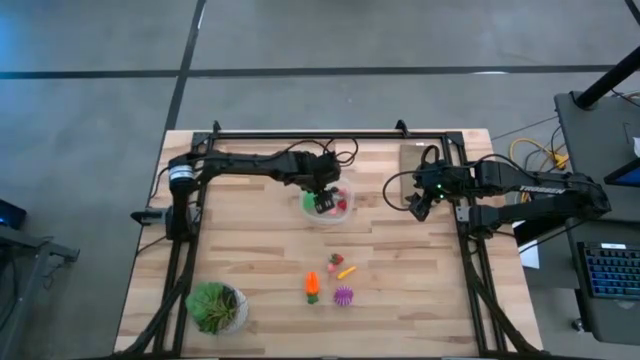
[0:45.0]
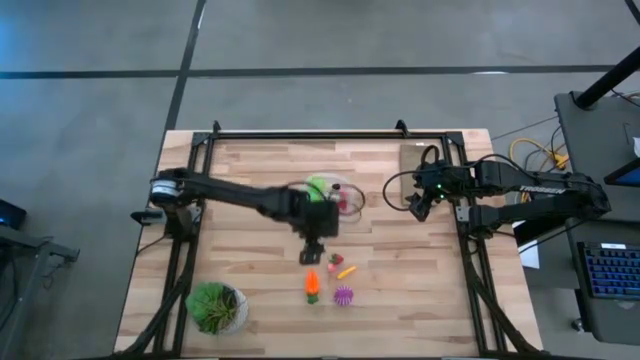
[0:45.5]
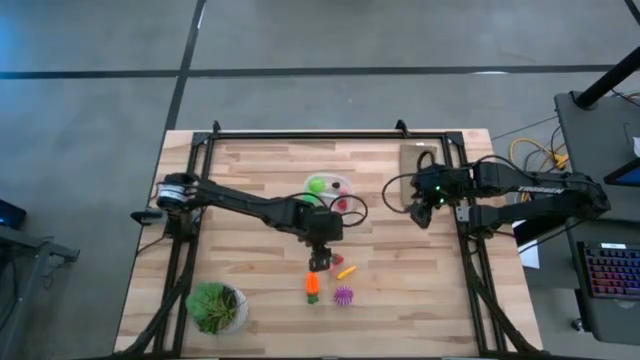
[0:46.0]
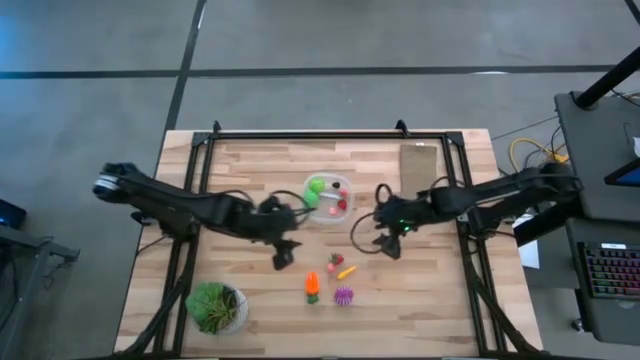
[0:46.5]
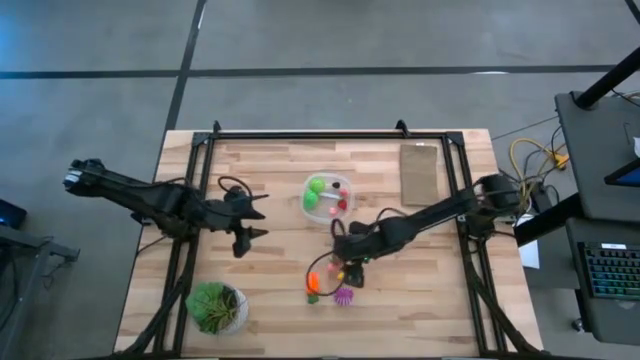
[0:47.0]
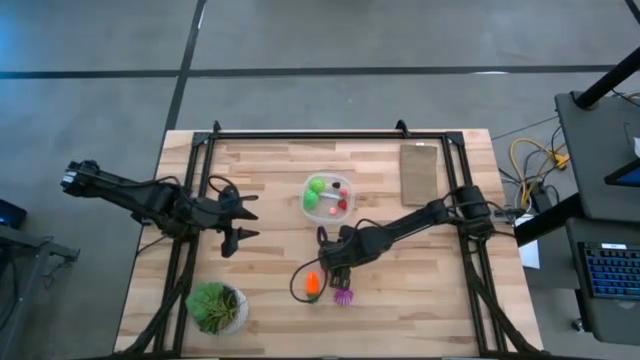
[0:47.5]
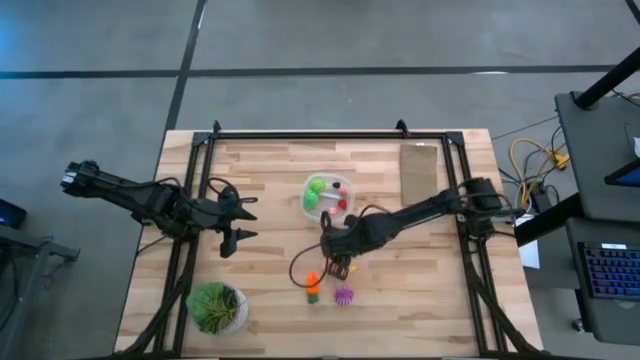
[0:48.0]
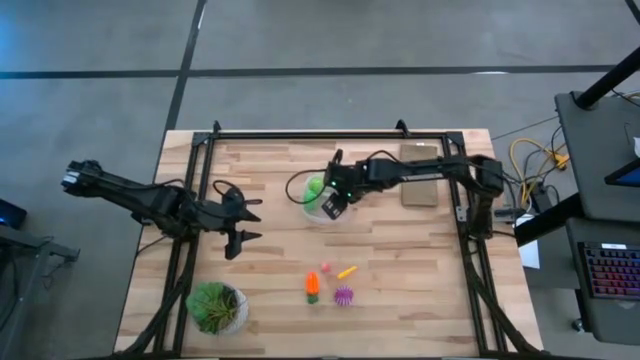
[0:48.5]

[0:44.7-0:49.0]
Task: Pick and placing Produce into tupperware
Put the red strawberry into the transparent container

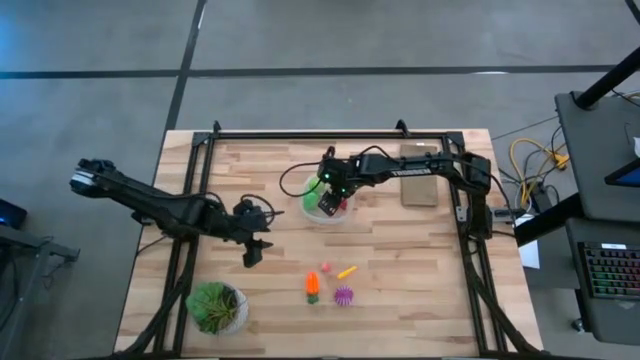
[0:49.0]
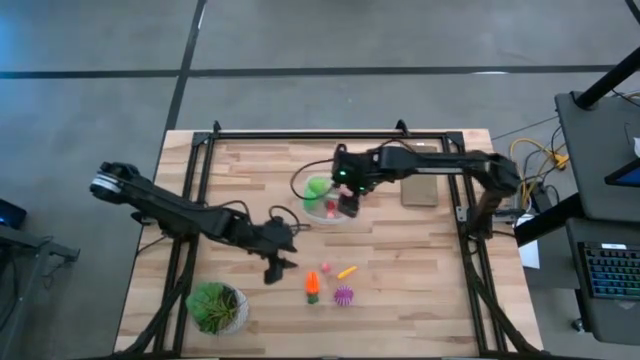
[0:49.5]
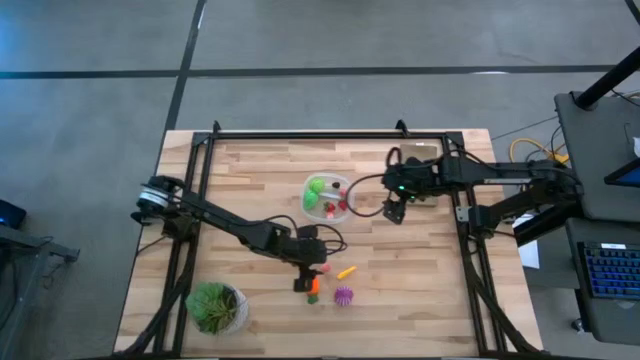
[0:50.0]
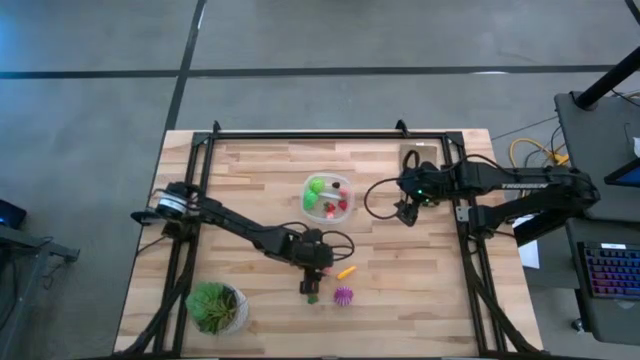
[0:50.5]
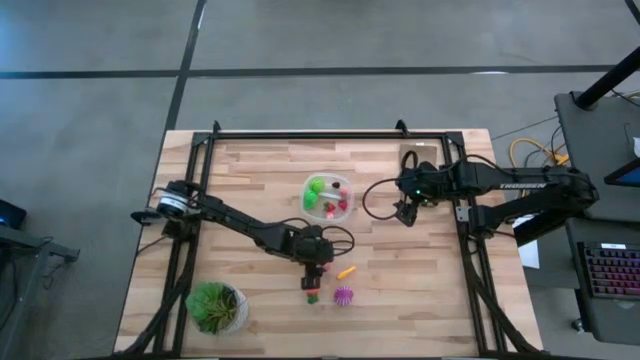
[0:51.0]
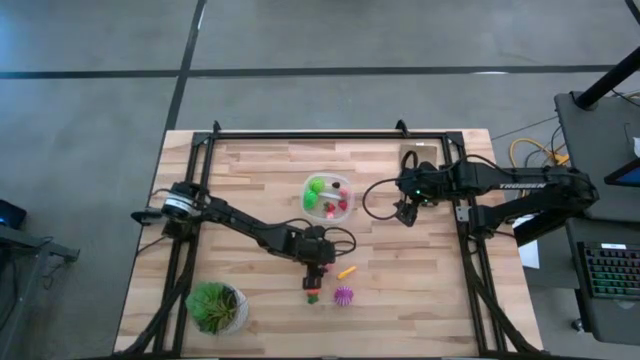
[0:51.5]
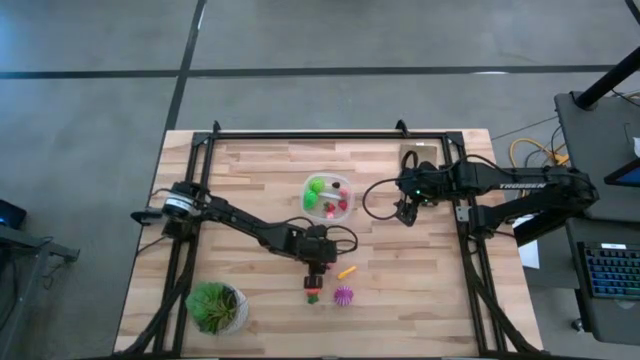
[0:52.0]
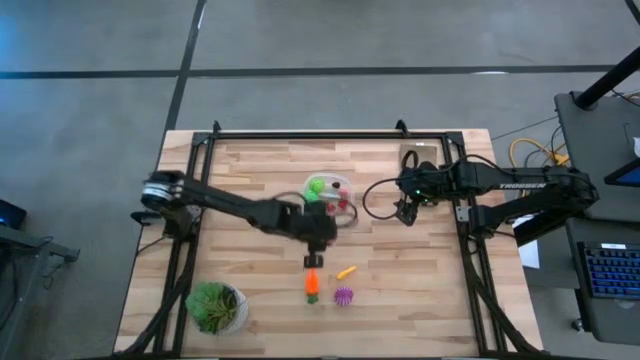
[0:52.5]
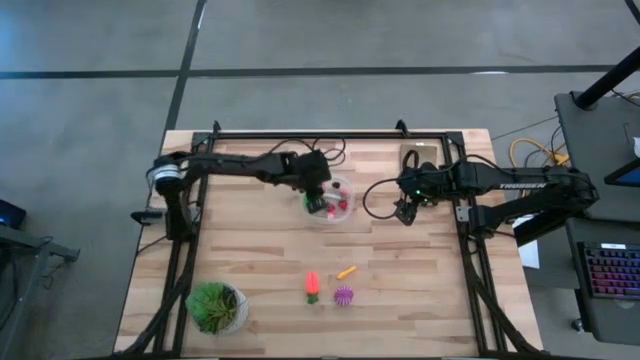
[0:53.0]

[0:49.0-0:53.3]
Put the pink peach into the transparent container

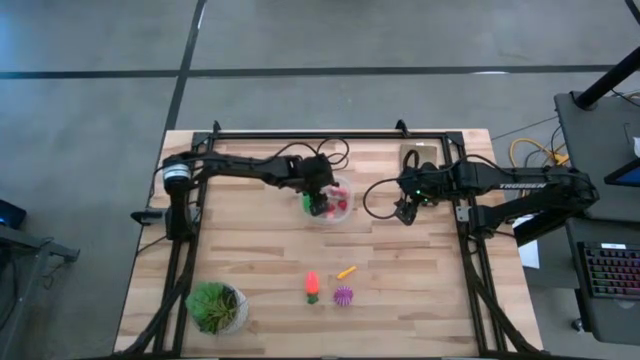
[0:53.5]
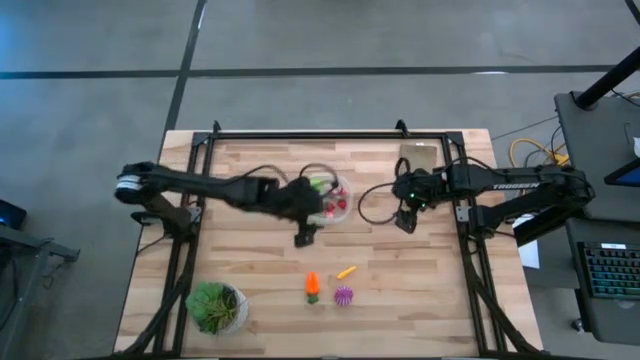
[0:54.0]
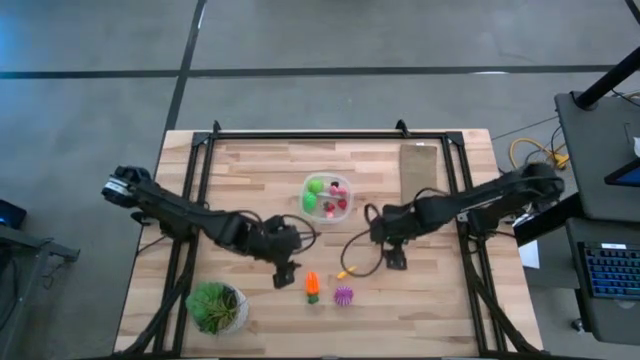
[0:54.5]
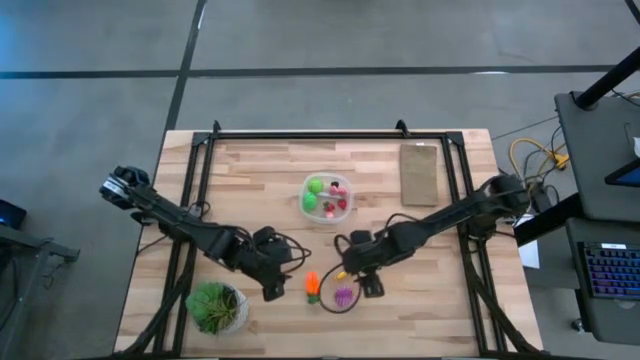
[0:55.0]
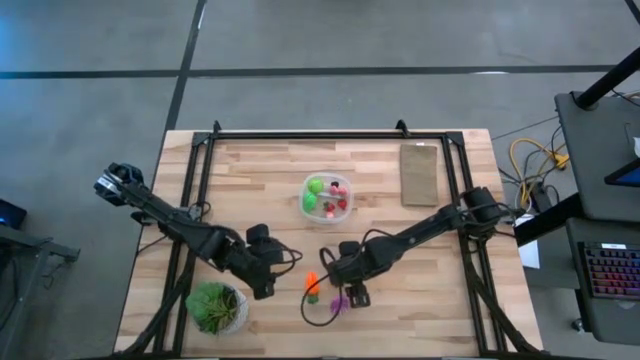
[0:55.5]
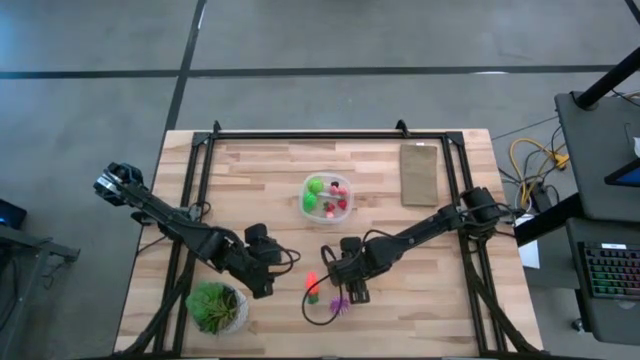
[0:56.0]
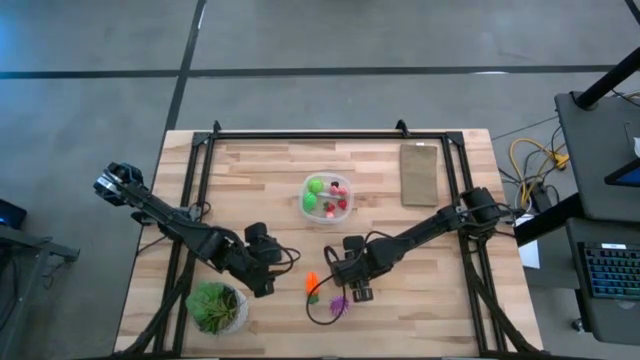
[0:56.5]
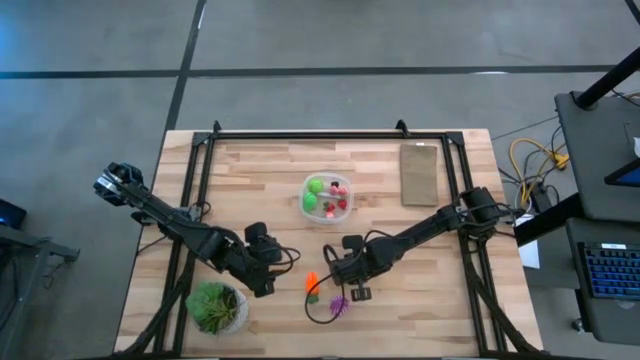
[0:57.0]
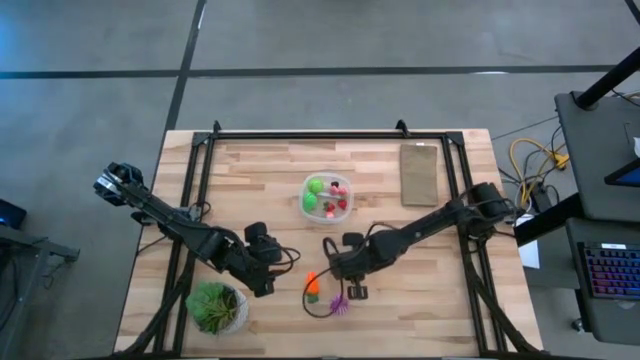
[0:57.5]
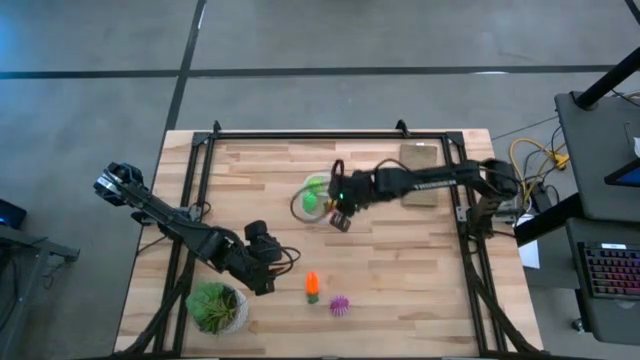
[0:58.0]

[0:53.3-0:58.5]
Put the yellow corn into the transparent container

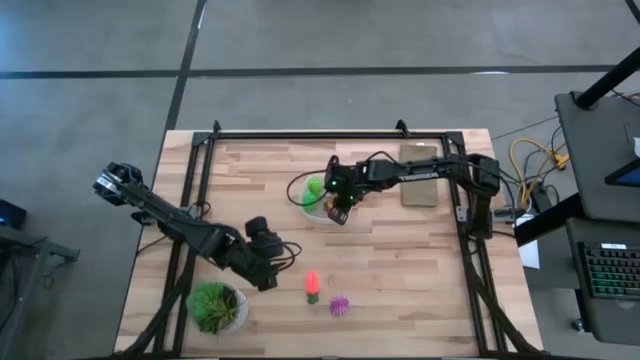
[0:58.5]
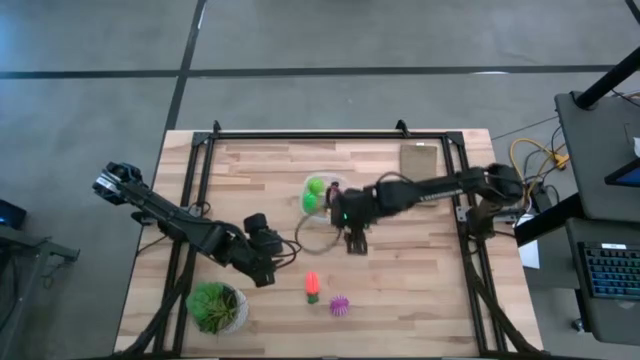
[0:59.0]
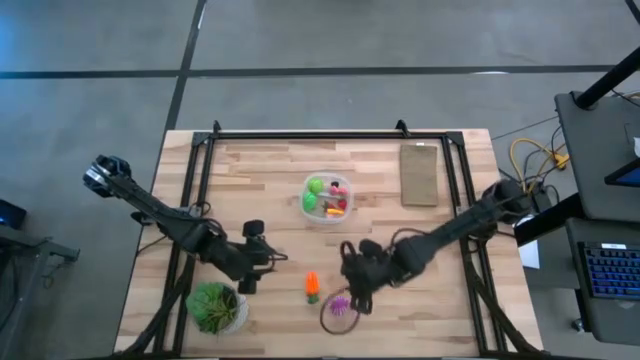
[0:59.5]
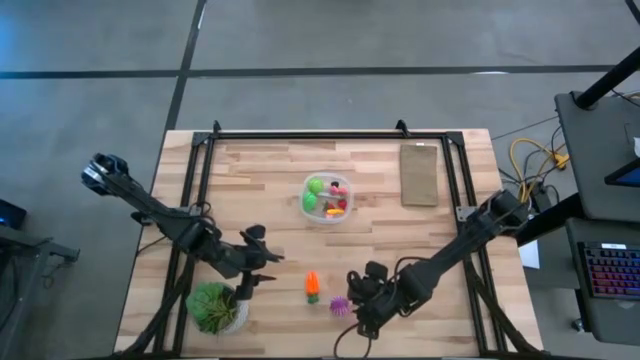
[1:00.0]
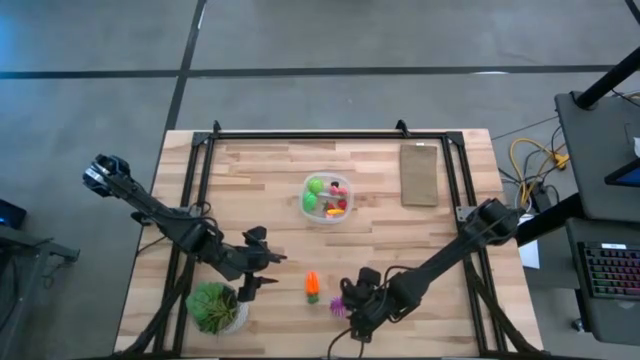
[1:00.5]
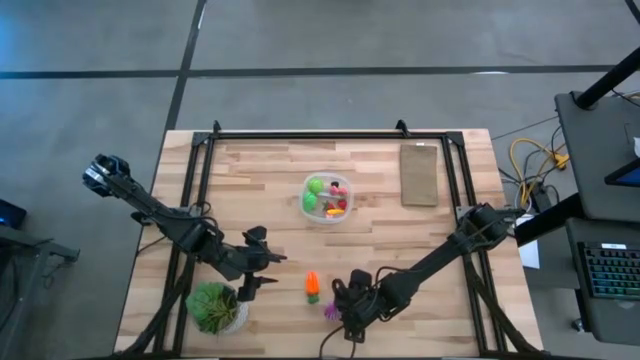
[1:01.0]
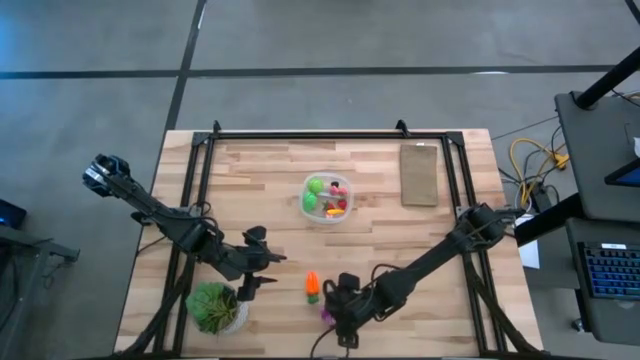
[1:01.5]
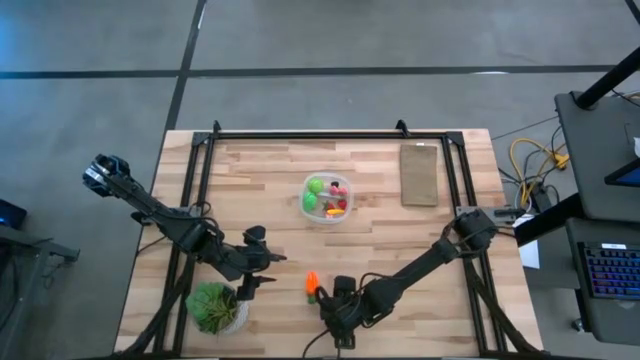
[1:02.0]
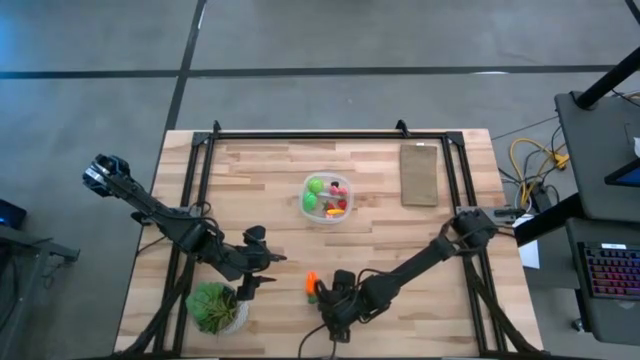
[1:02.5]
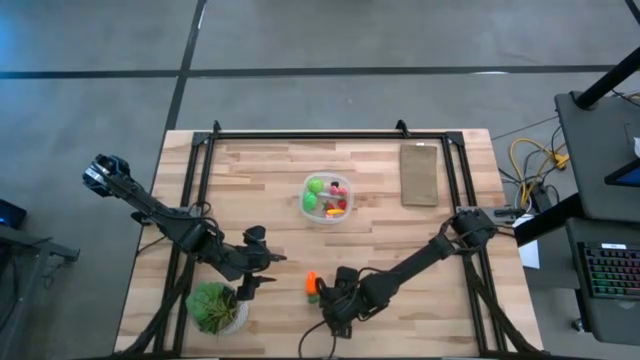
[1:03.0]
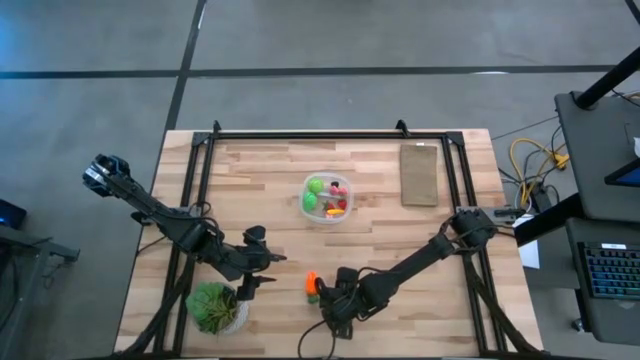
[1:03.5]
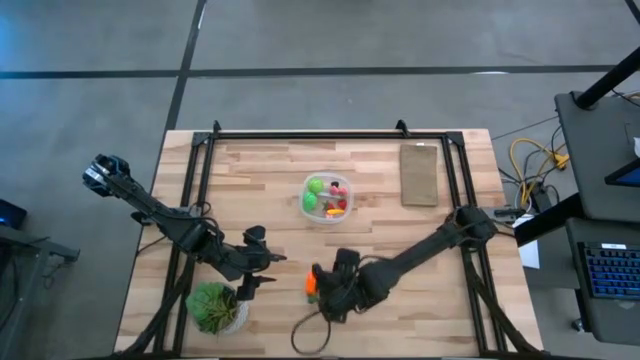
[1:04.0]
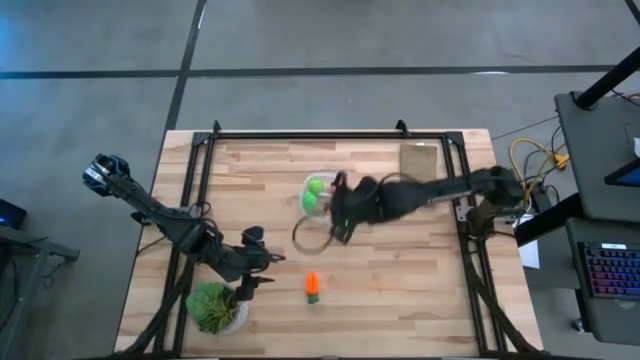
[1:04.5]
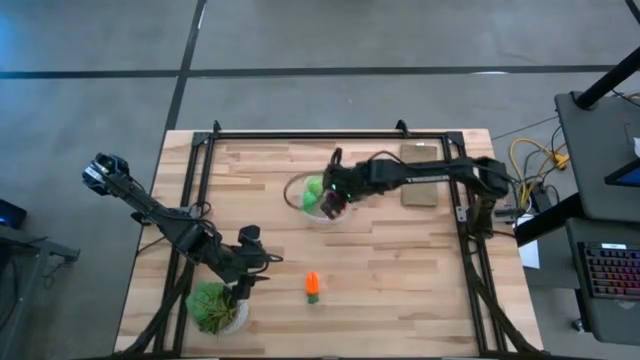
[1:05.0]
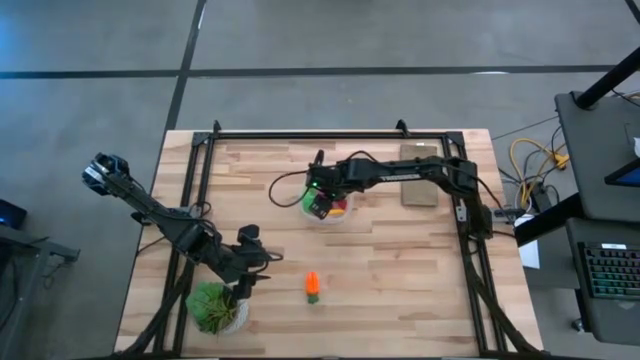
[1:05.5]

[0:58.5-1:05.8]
Put the purple onion into the transparent container
